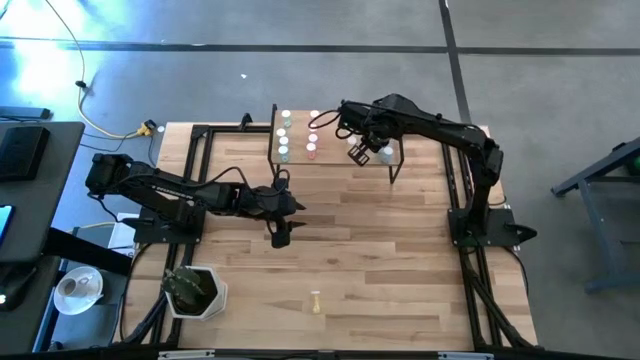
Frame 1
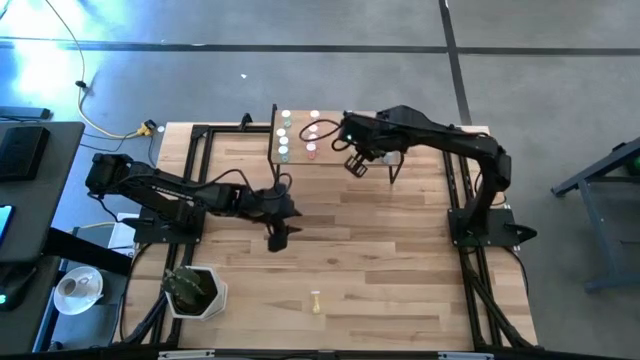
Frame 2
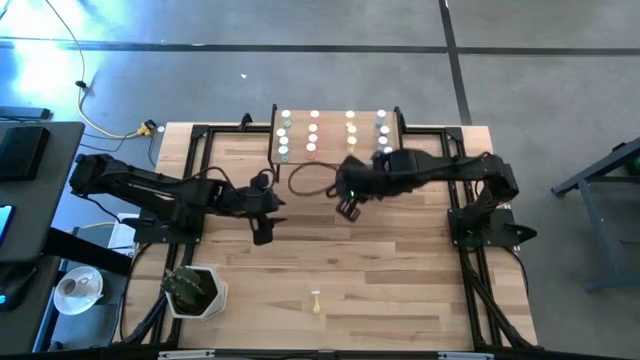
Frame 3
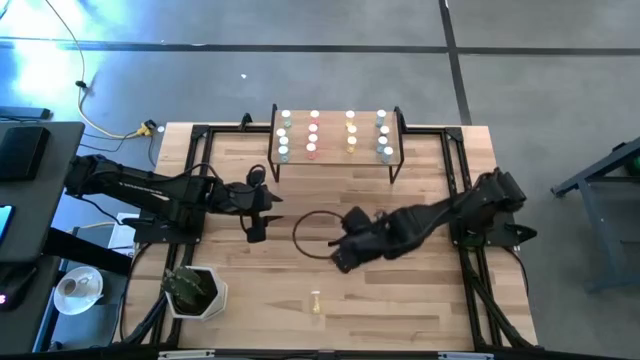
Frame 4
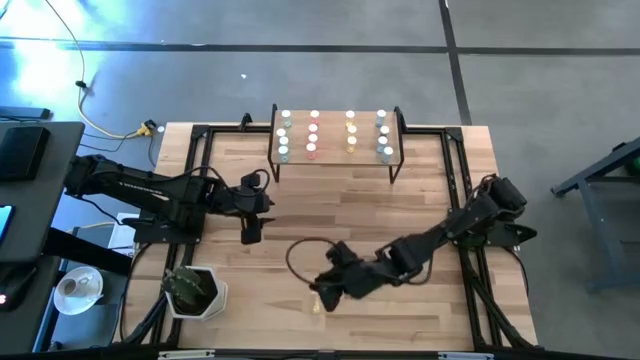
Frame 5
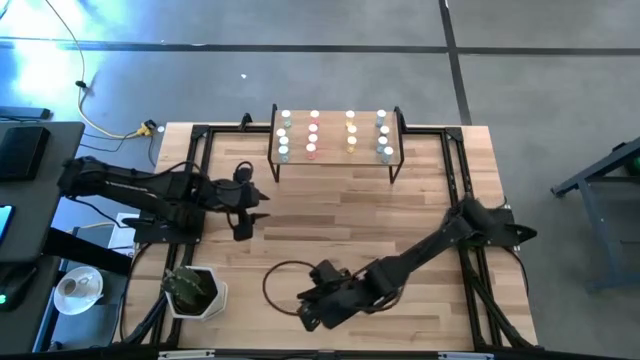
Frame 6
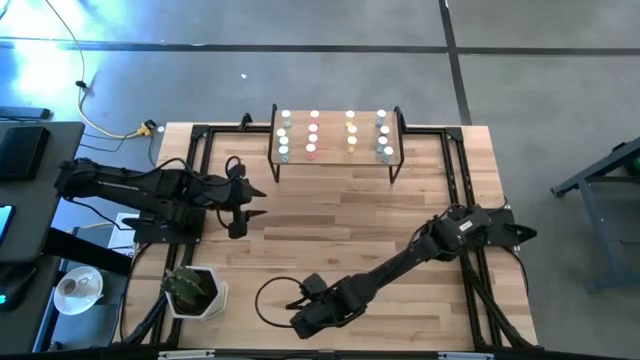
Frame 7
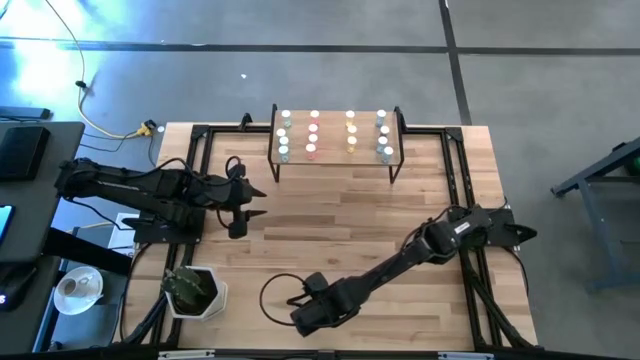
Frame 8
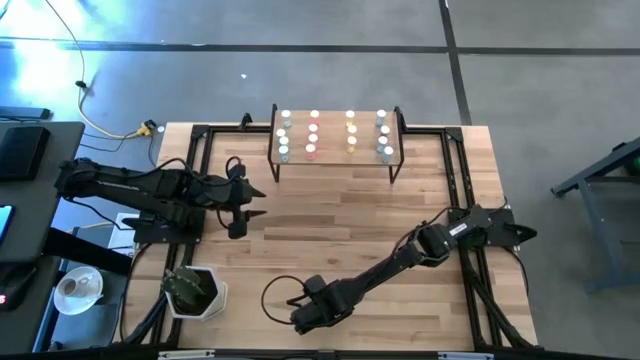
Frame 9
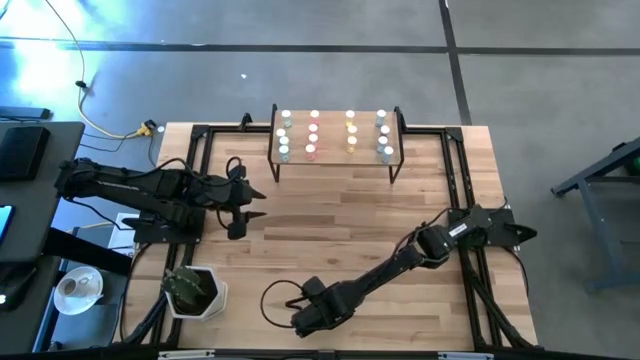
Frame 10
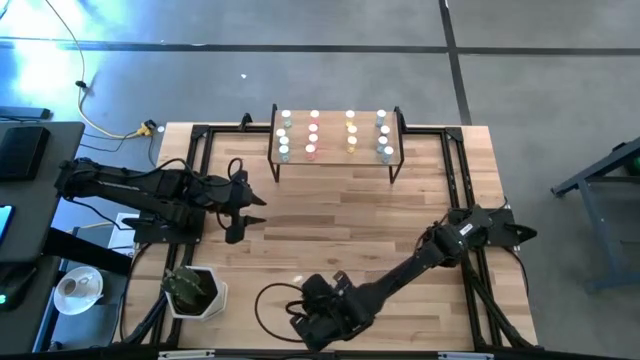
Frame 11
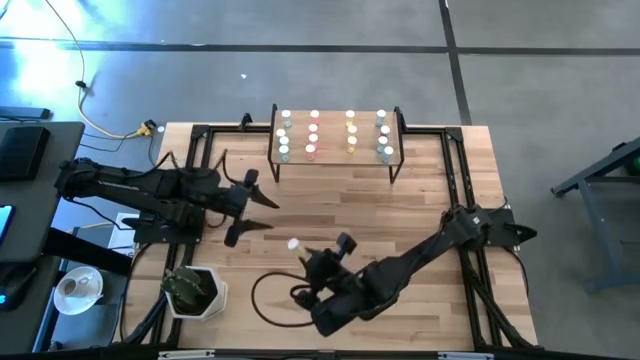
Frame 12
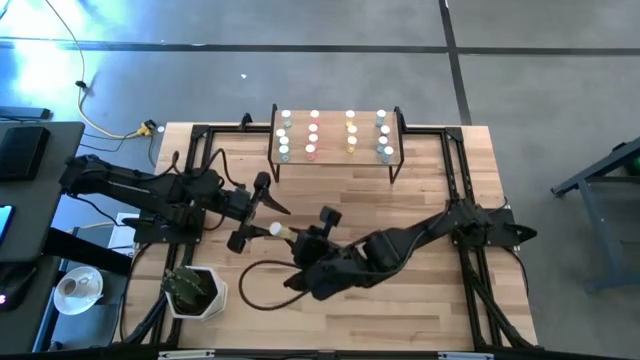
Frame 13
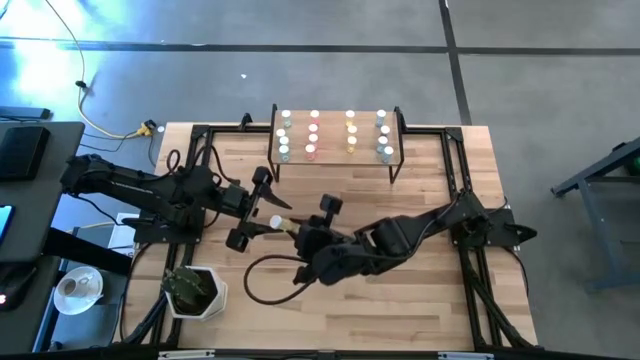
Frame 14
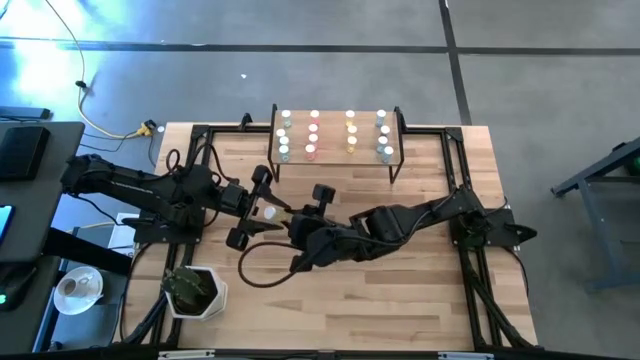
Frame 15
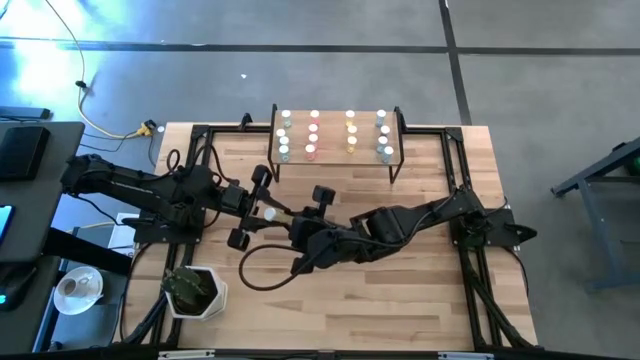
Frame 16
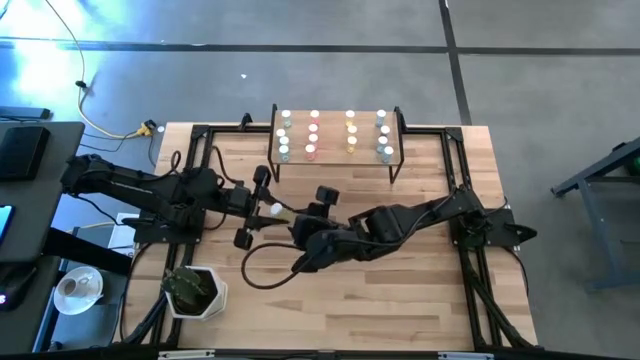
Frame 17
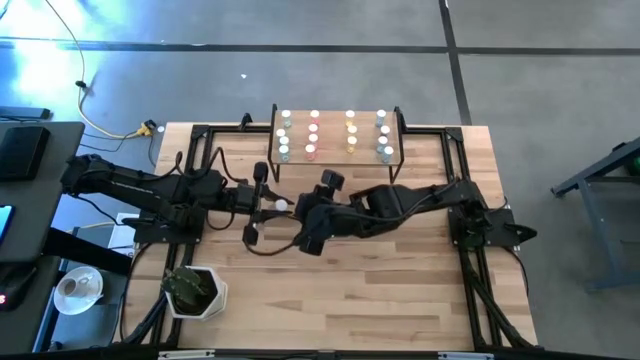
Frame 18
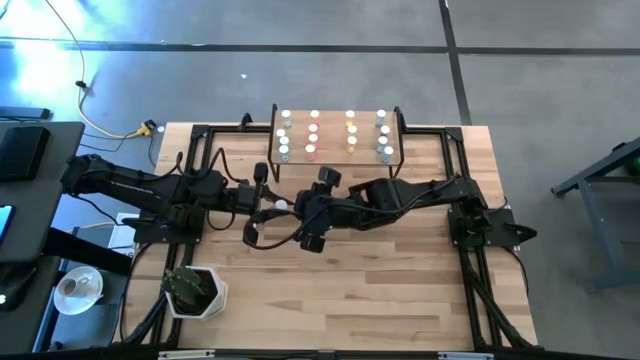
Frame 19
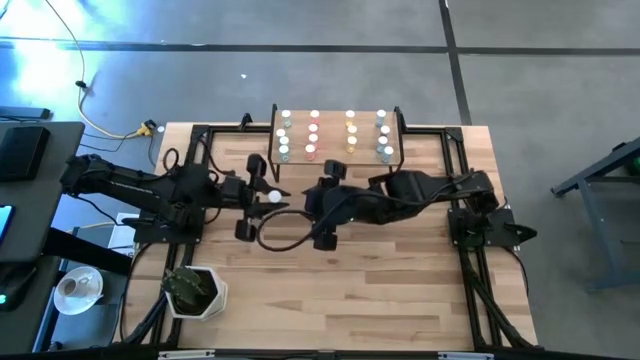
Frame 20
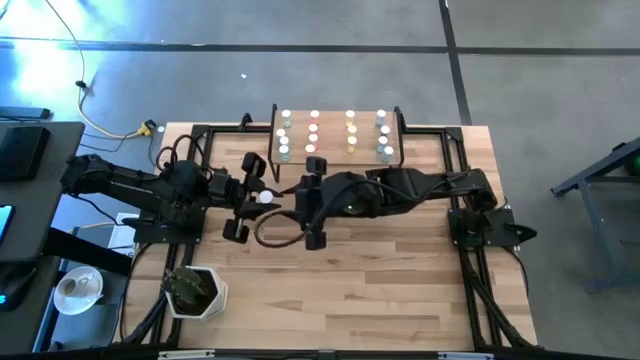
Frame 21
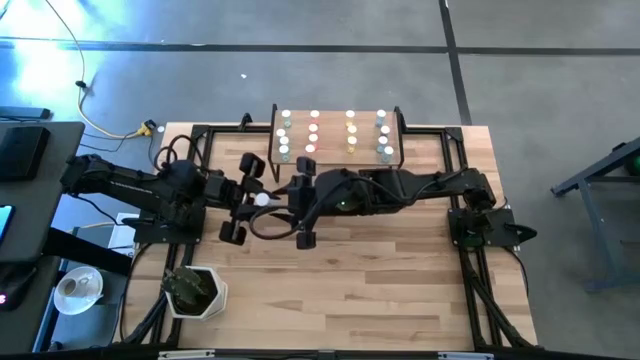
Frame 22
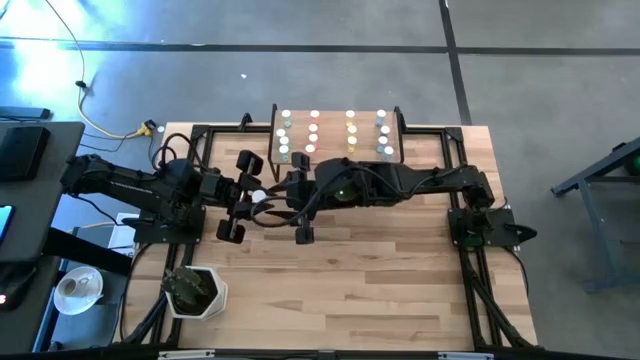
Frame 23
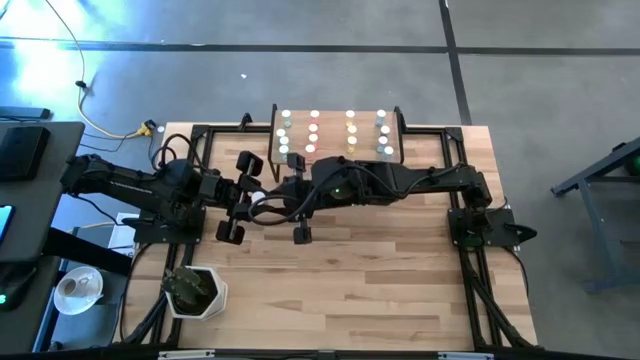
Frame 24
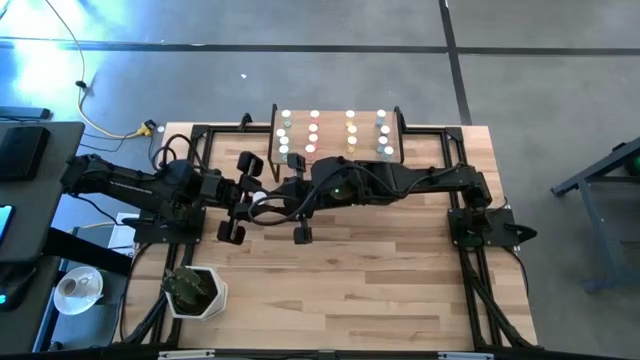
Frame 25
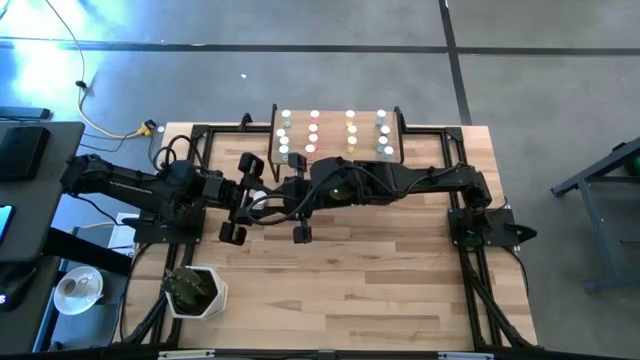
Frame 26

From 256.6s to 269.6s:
Task: Pick and place medicine bottles onto shelf by color
Put the yellow pill bottle on the shelf

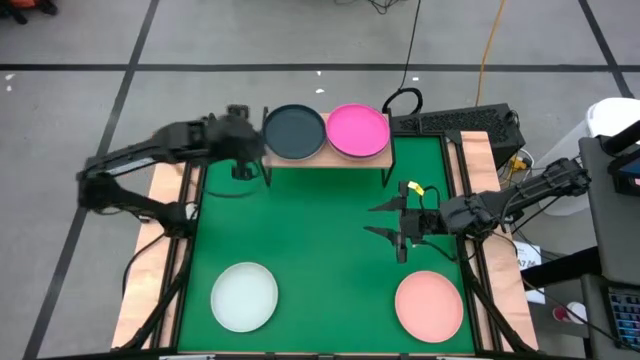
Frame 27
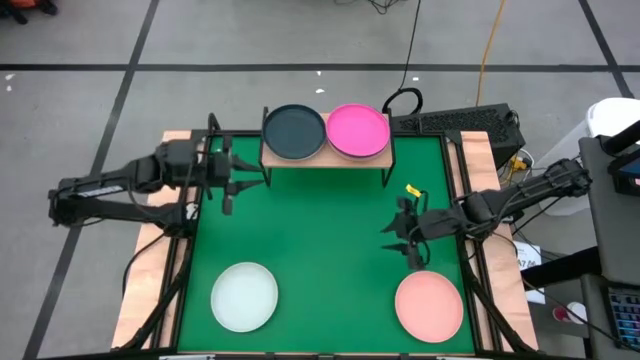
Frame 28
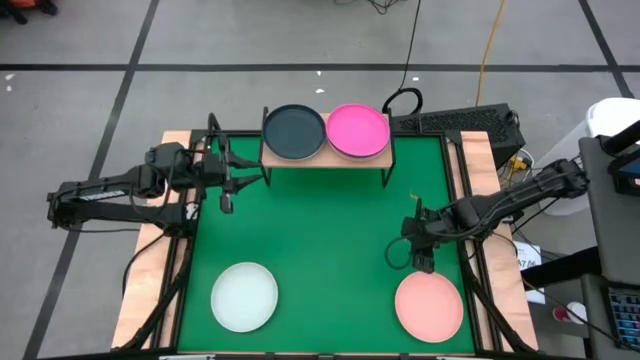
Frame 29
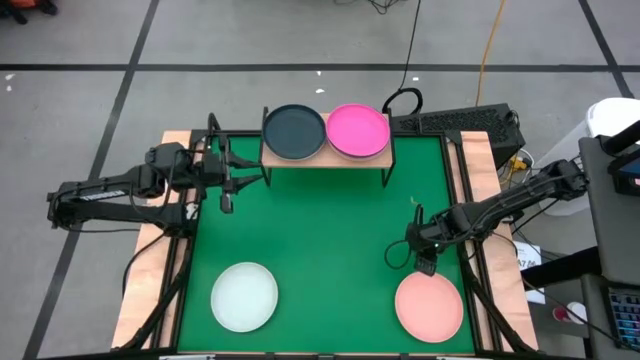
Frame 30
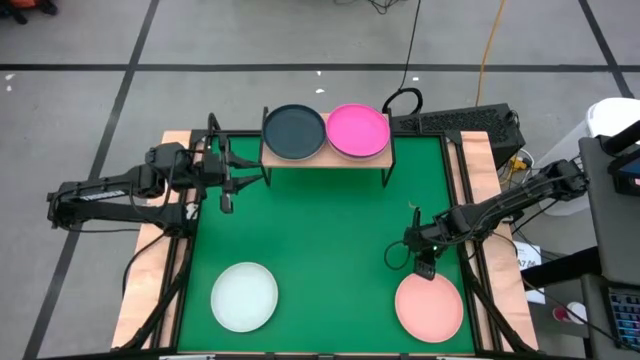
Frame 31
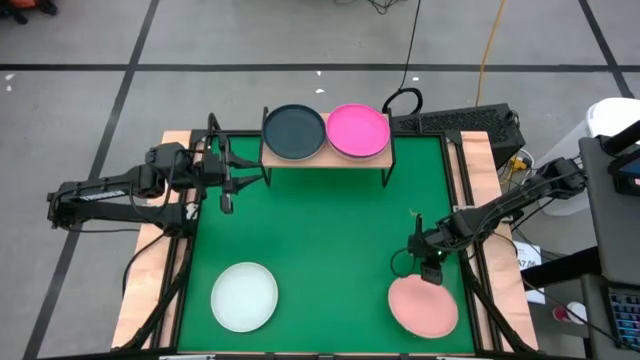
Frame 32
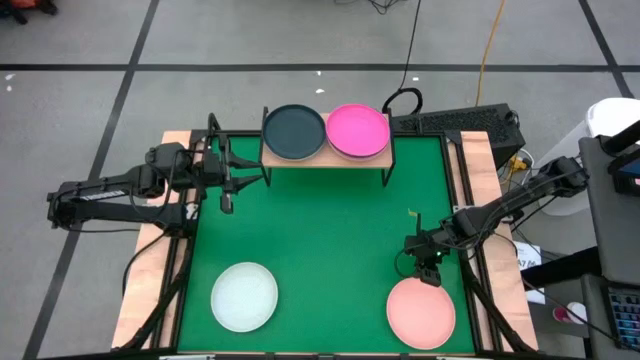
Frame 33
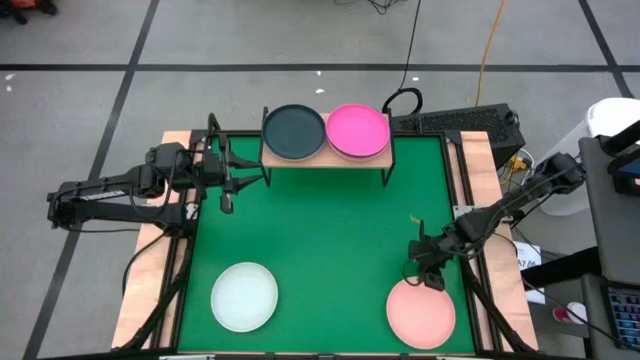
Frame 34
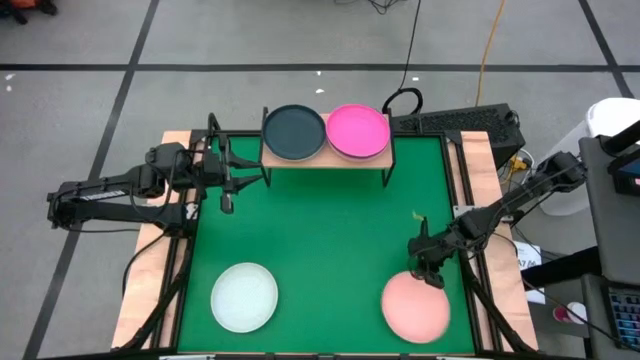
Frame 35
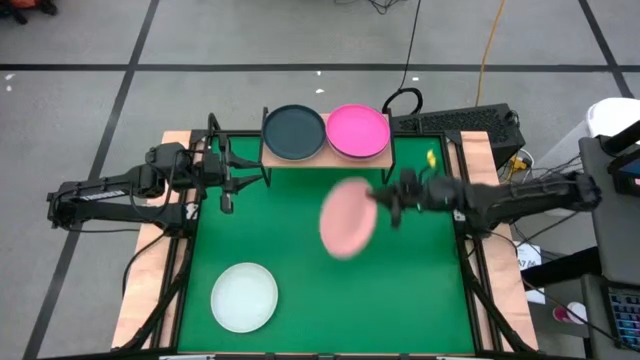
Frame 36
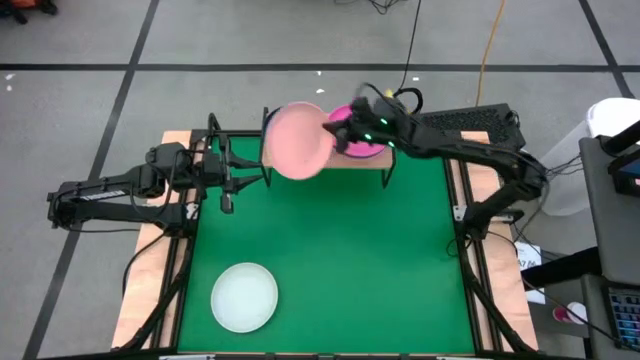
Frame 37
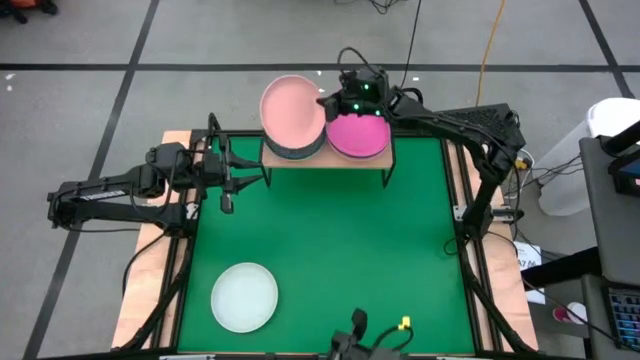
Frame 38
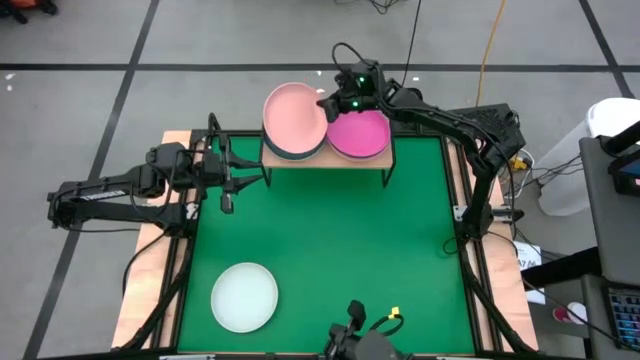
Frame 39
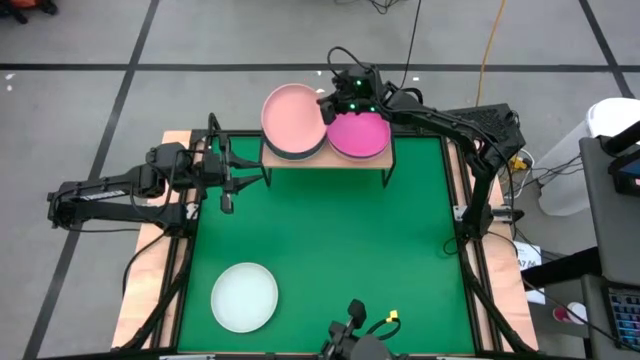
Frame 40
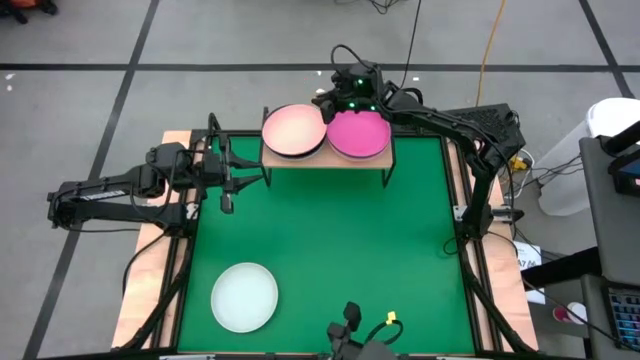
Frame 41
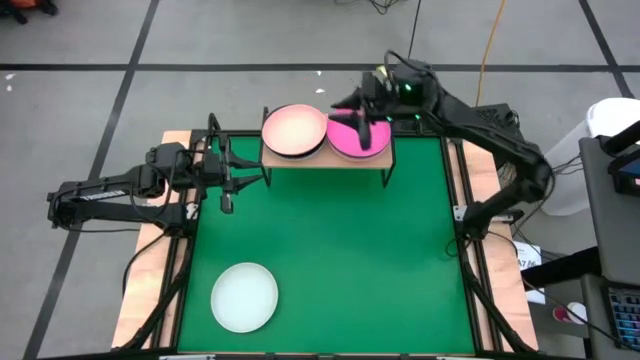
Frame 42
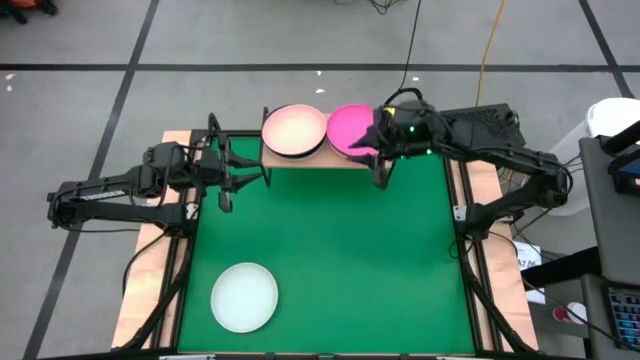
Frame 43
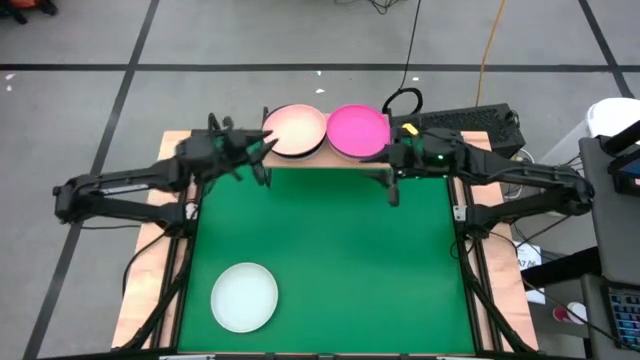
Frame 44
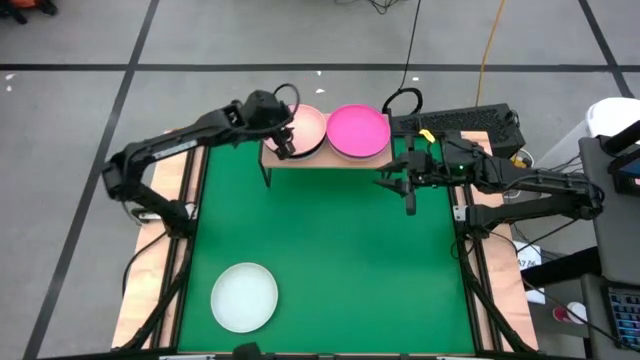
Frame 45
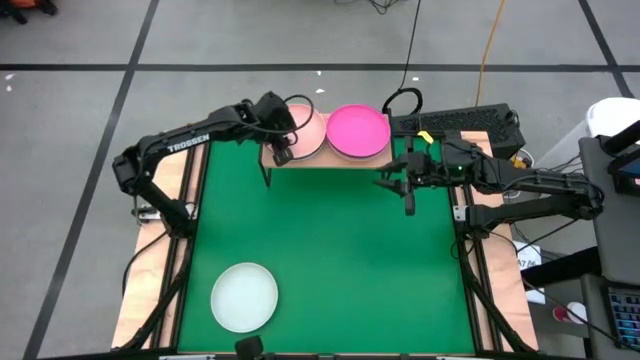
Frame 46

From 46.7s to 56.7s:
Task: Place and stack plates onto a shelf
Stack the light orange plate on the dark blue plate on the shelf
